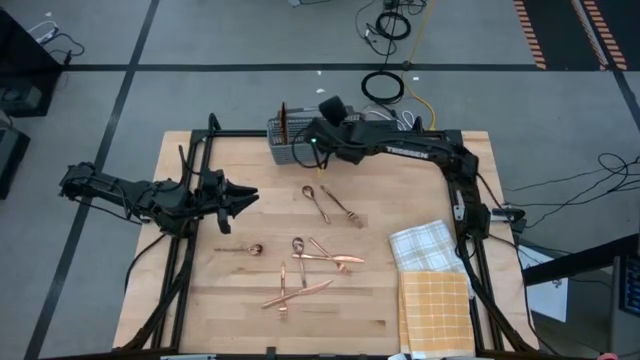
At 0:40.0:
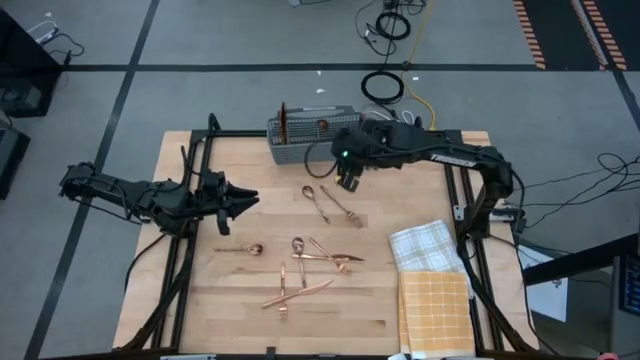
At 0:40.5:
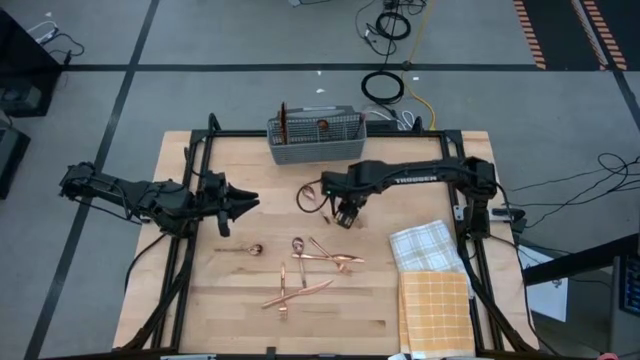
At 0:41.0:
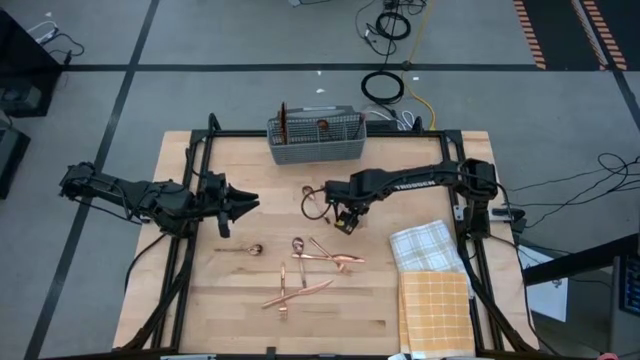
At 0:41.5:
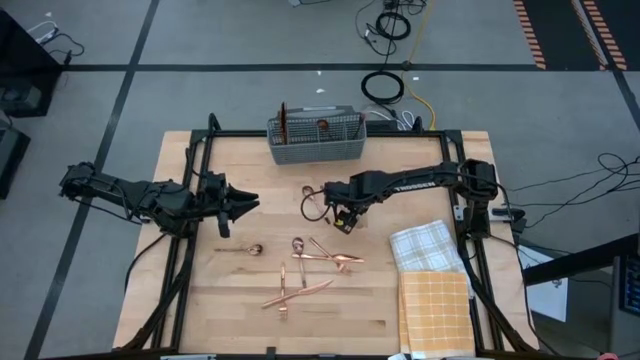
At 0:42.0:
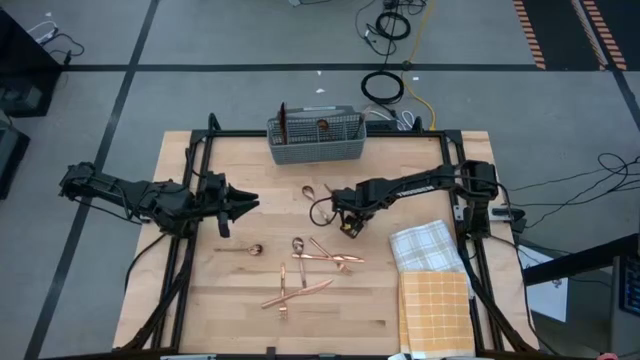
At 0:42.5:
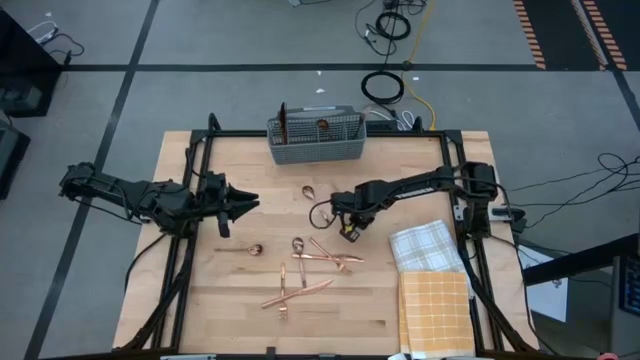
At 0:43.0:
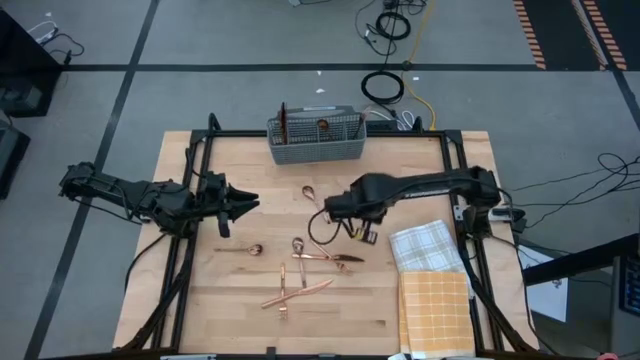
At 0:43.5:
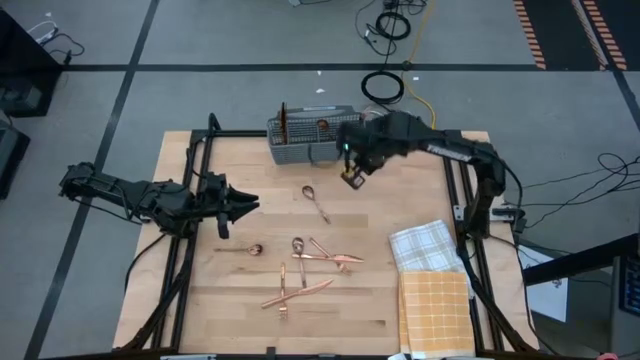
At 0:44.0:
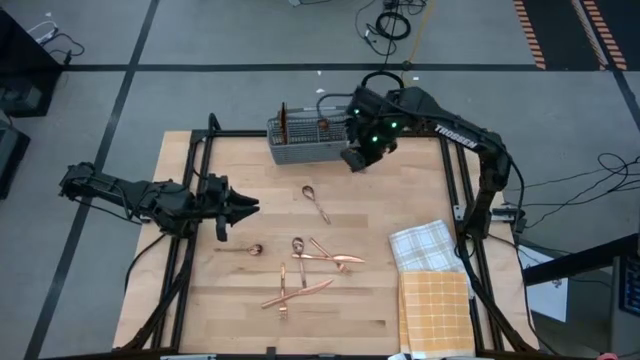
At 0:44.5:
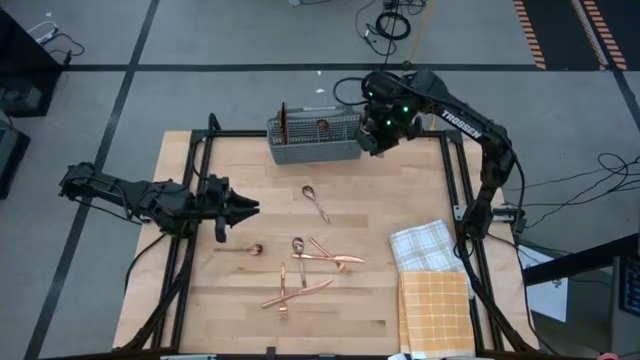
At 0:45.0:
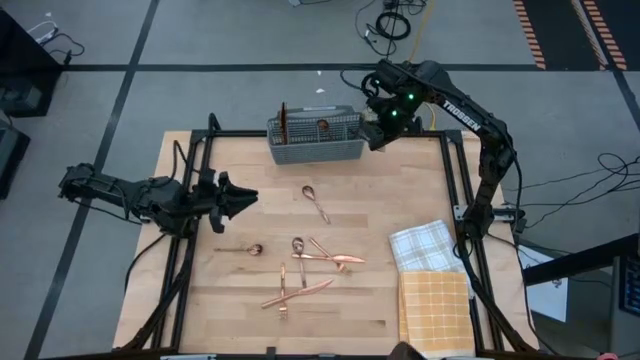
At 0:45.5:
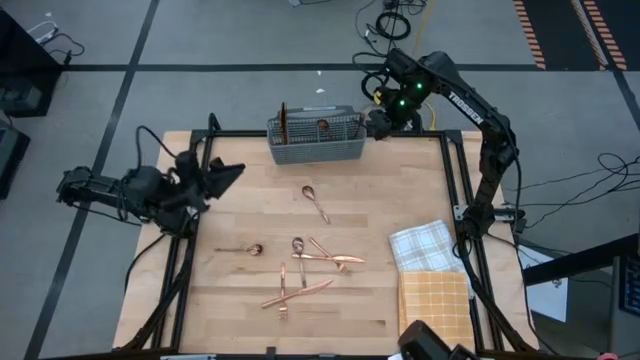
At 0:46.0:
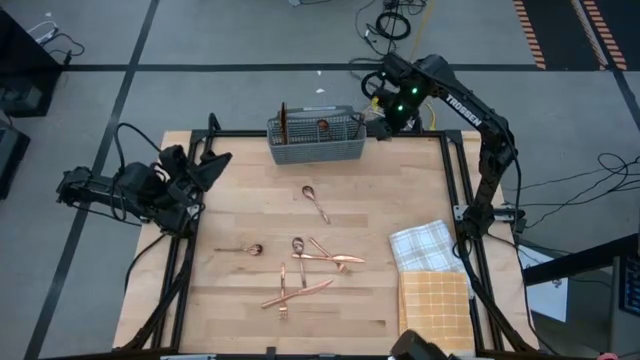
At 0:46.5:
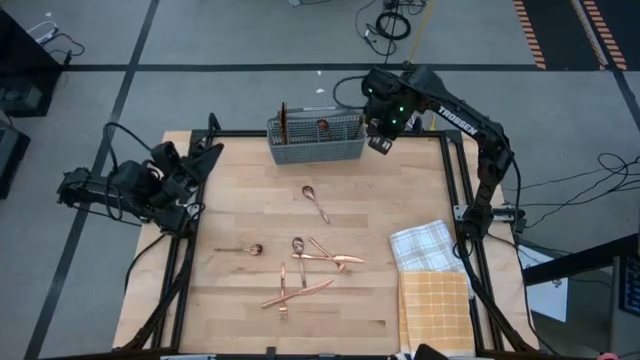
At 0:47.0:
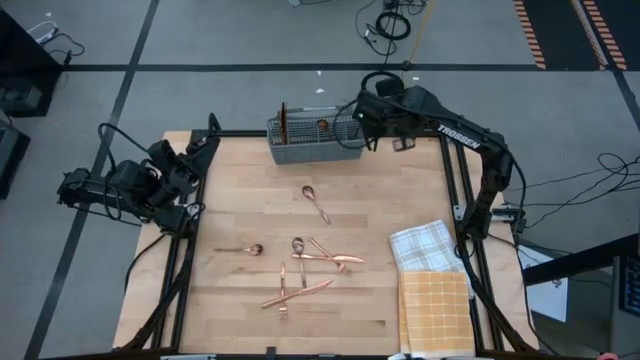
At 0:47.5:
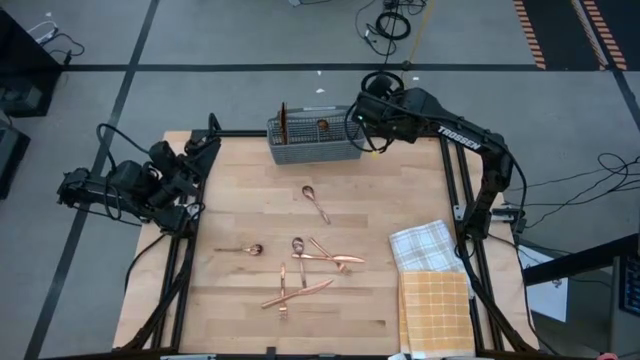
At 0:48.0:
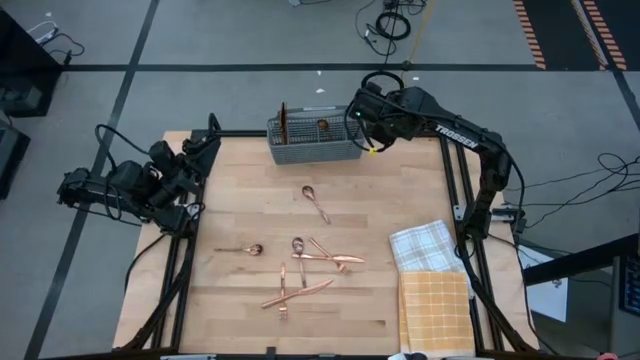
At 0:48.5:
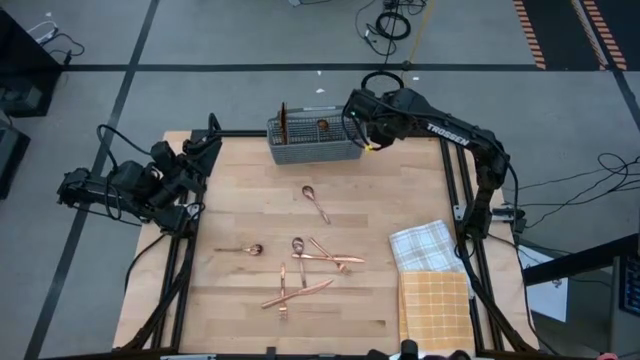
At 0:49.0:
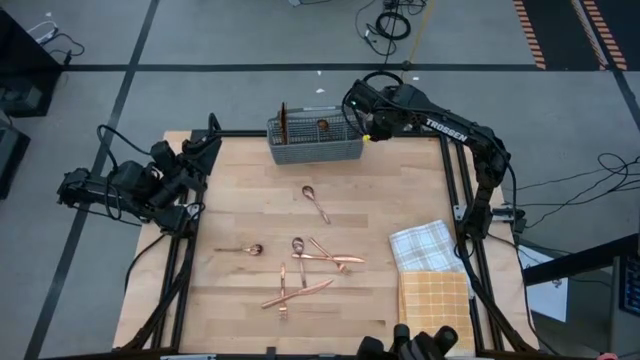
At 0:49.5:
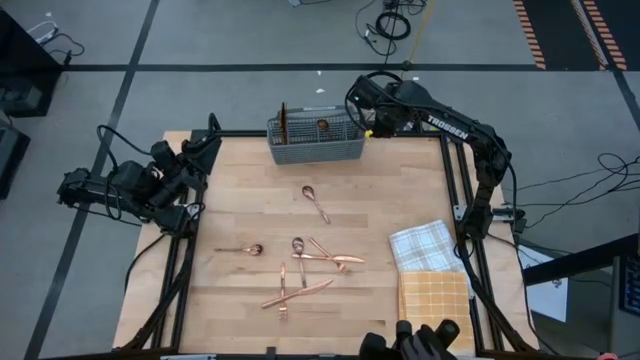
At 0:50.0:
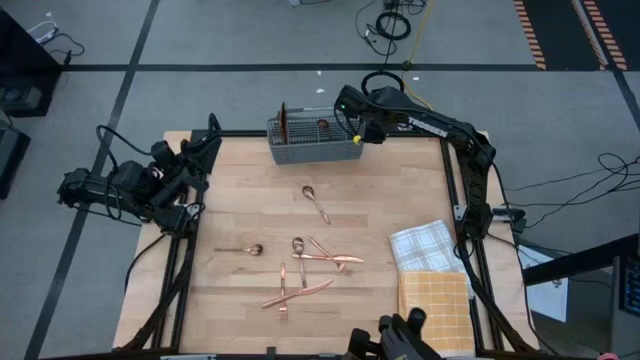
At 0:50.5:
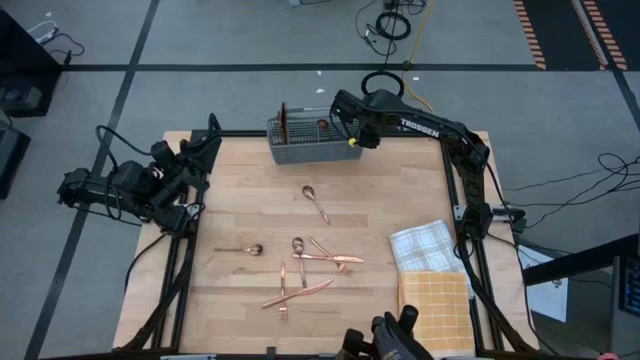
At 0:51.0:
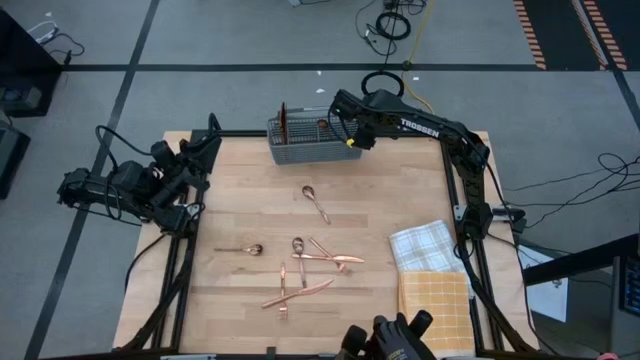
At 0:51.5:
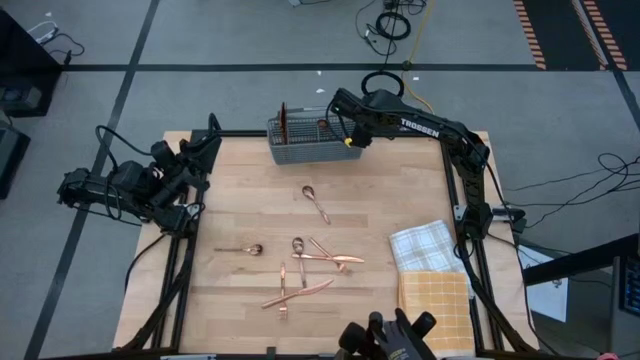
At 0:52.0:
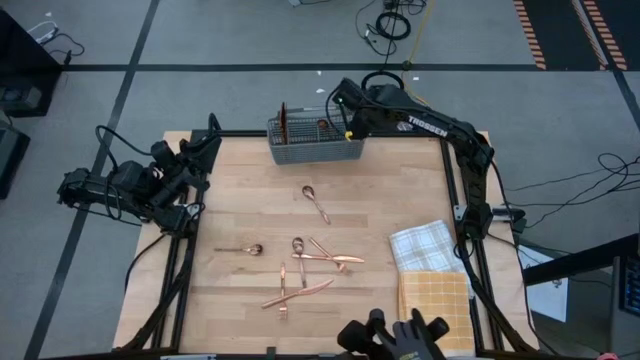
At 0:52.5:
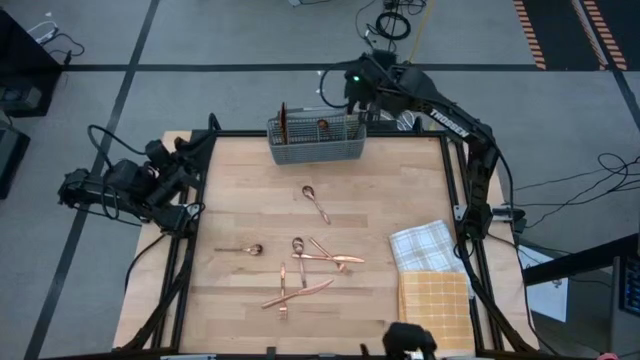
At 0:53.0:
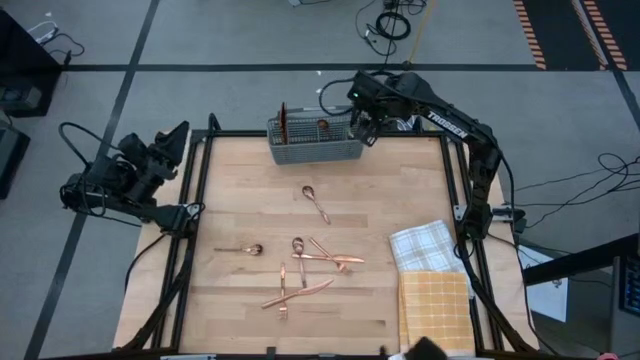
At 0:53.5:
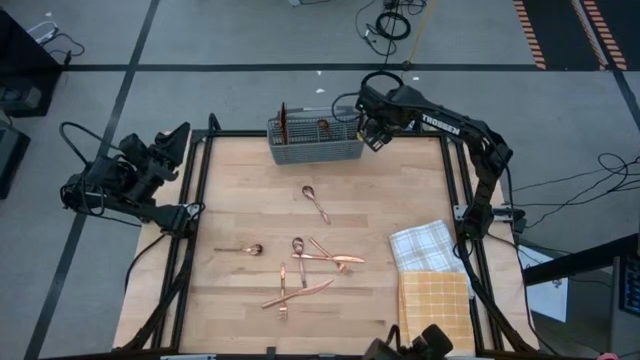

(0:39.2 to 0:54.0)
Task: Sort silverware
Put the top right bronze fork into the gray silverware rack

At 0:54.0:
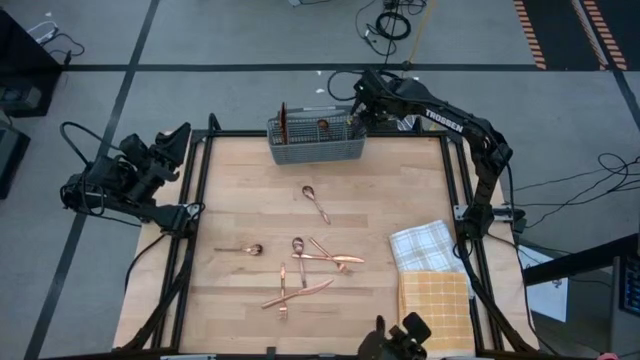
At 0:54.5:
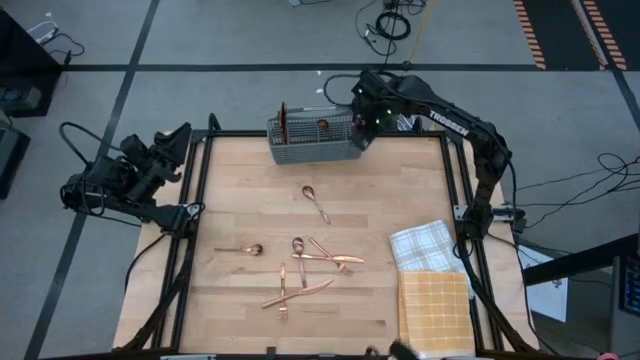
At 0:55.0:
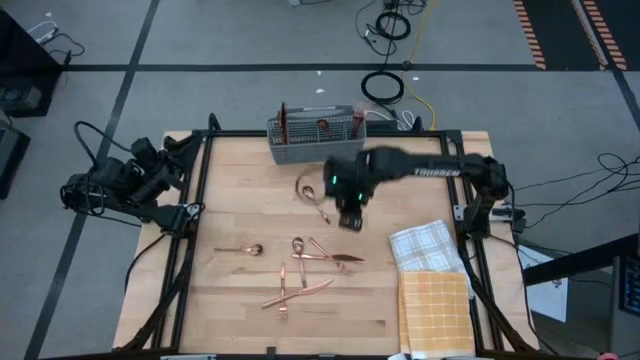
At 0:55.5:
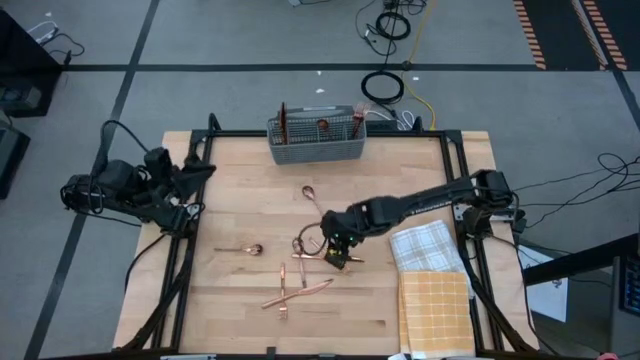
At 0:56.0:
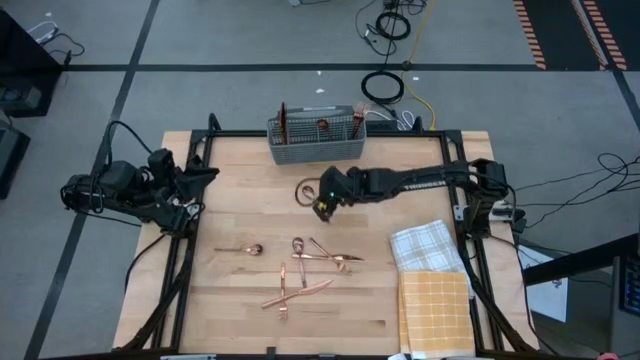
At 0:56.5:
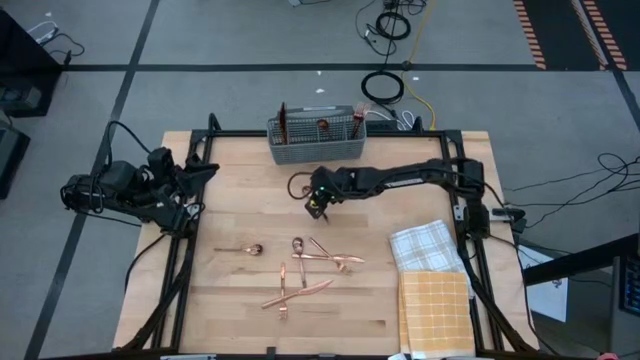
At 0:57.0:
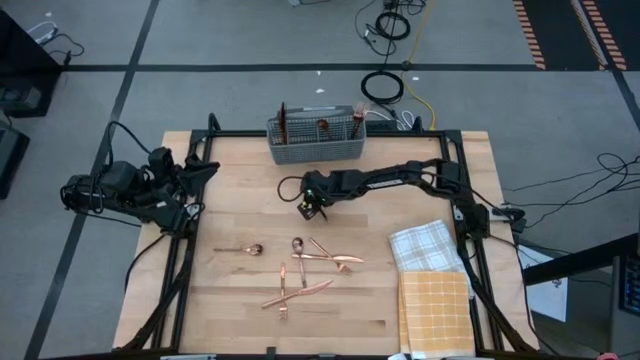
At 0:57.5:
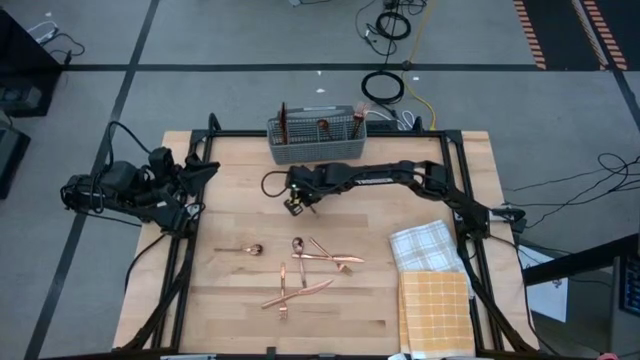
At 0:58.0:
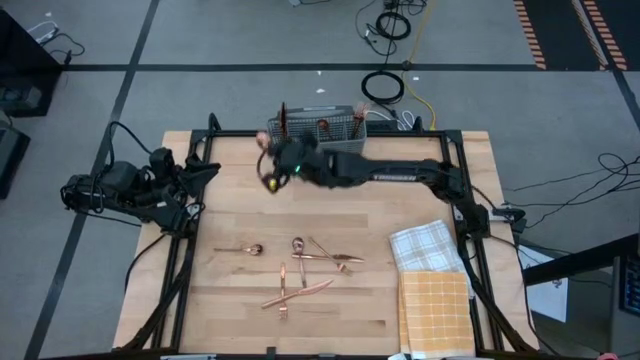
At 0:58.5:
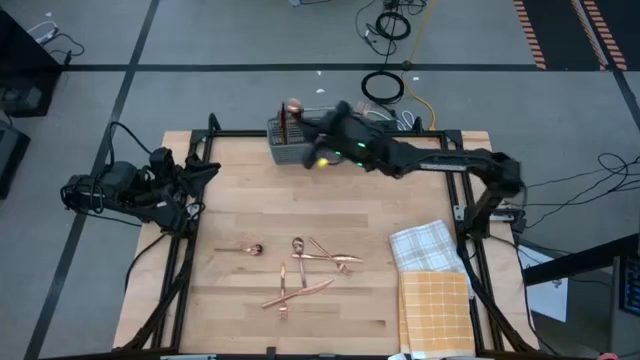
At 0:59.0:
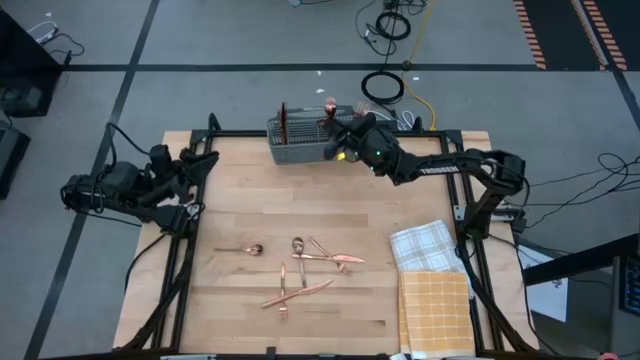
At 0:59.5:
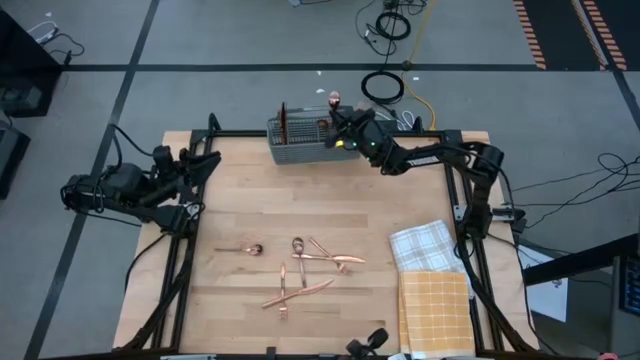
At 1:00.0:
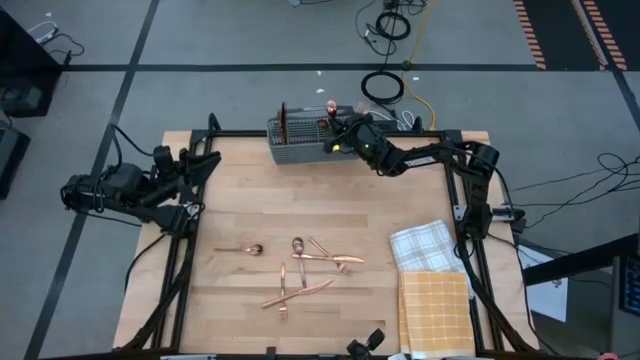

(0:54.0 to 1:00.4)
Put the top right bronze spoon into the gray silverware rack
